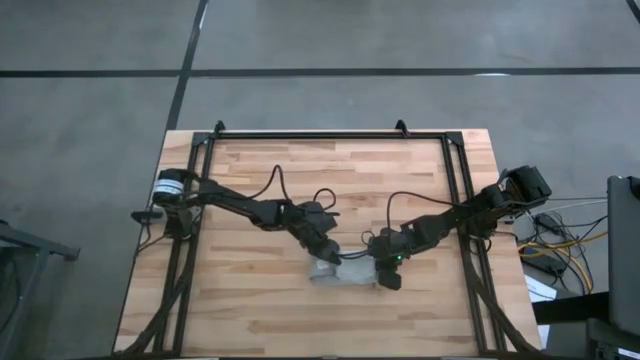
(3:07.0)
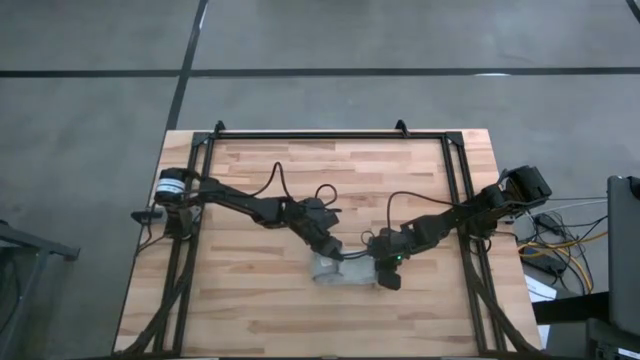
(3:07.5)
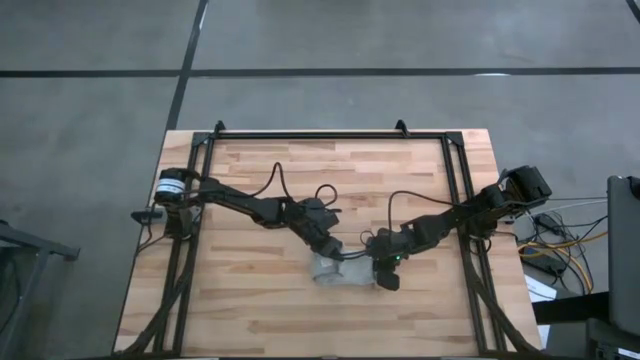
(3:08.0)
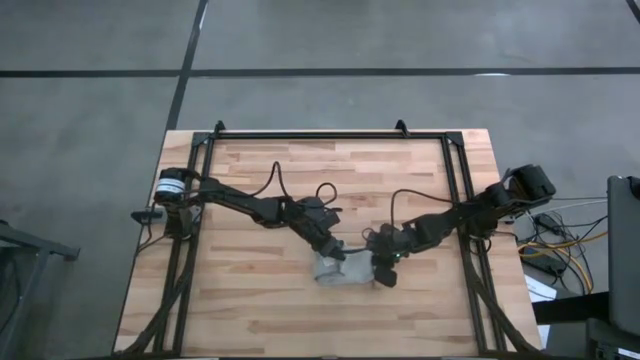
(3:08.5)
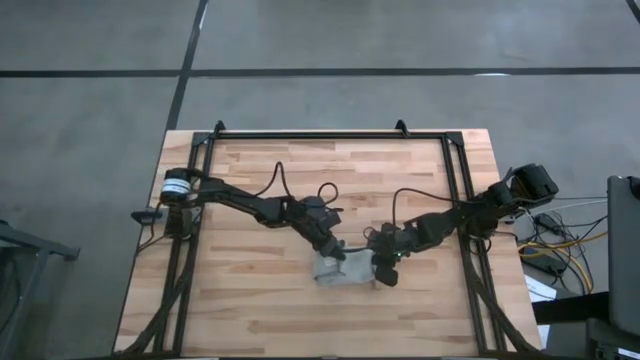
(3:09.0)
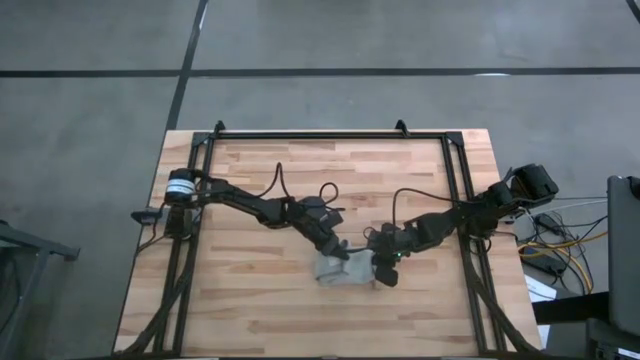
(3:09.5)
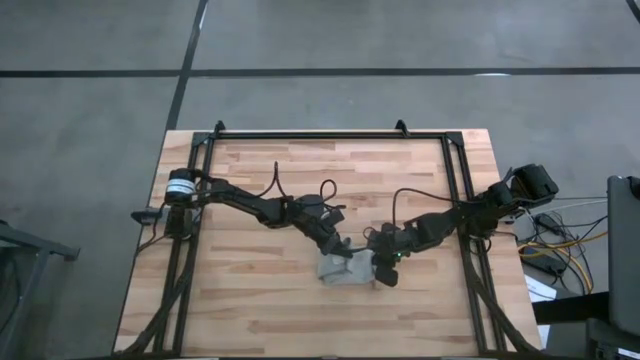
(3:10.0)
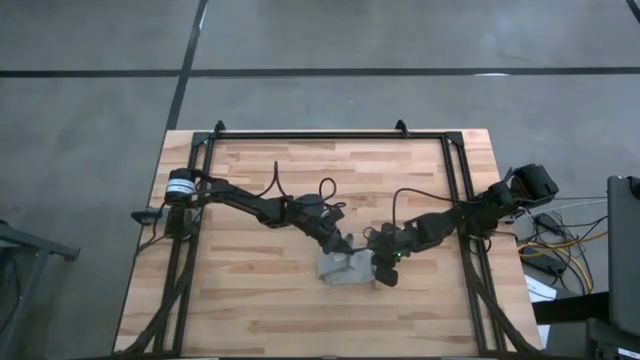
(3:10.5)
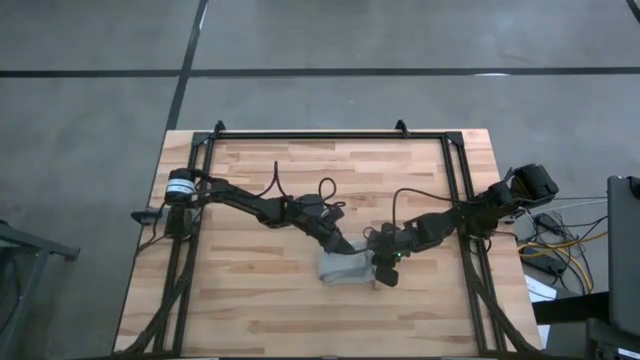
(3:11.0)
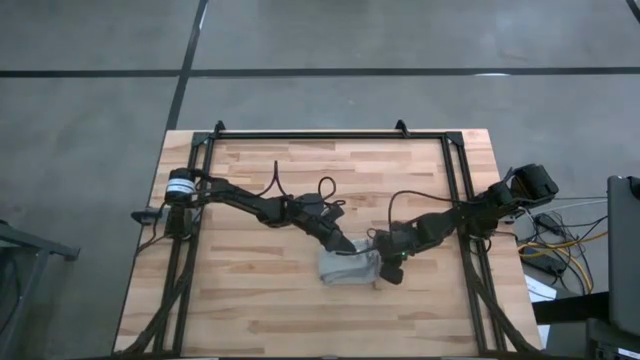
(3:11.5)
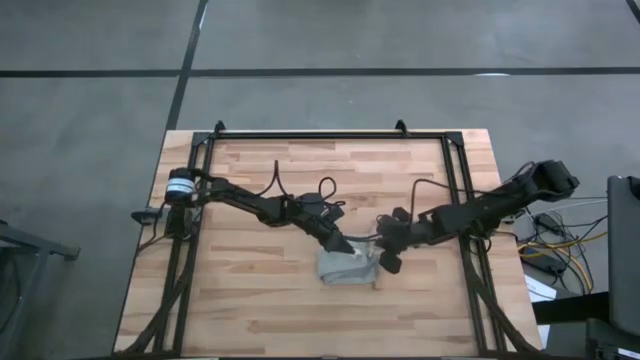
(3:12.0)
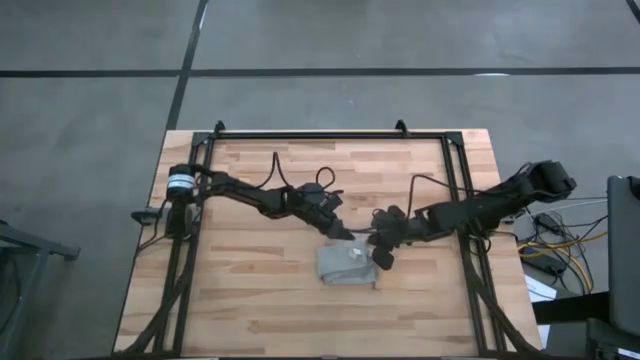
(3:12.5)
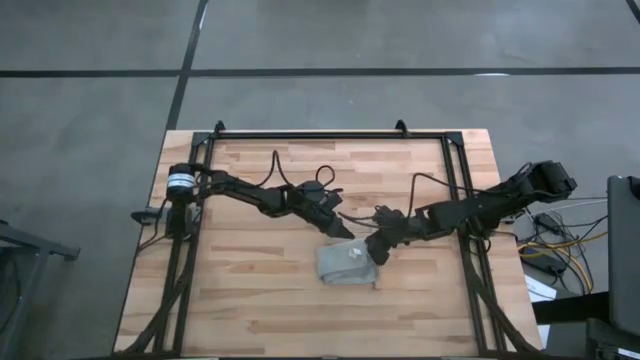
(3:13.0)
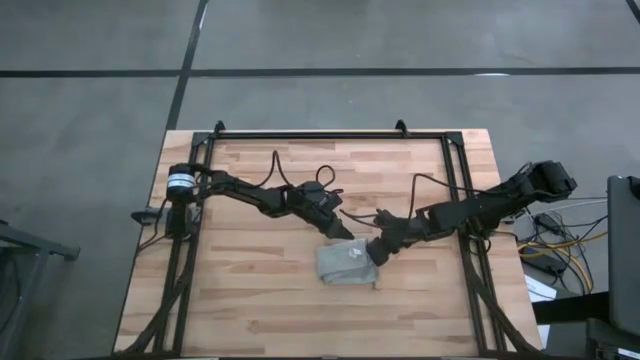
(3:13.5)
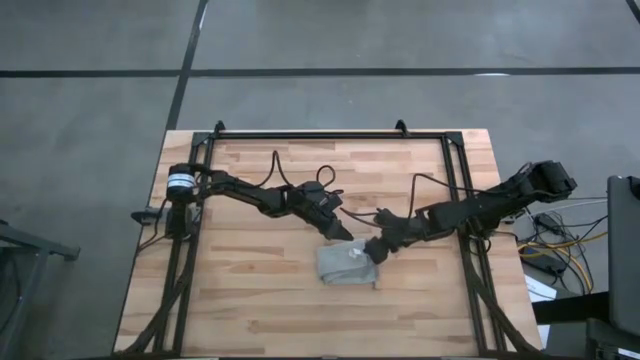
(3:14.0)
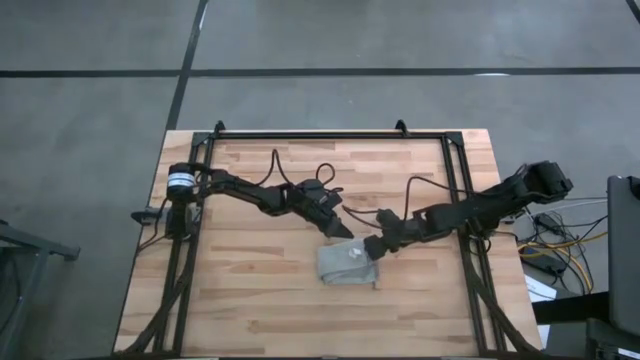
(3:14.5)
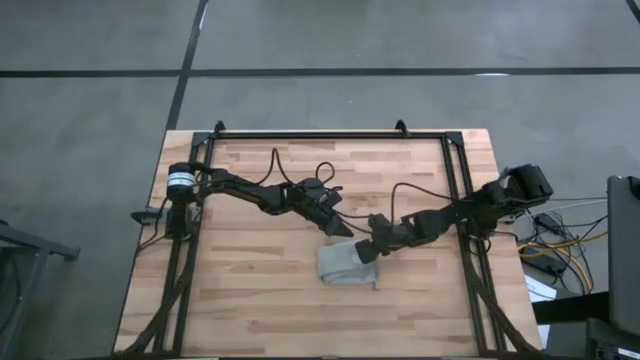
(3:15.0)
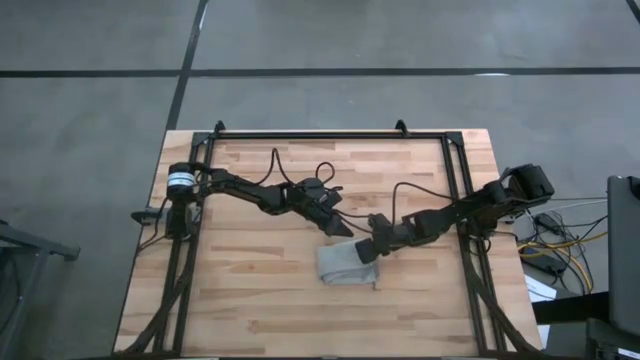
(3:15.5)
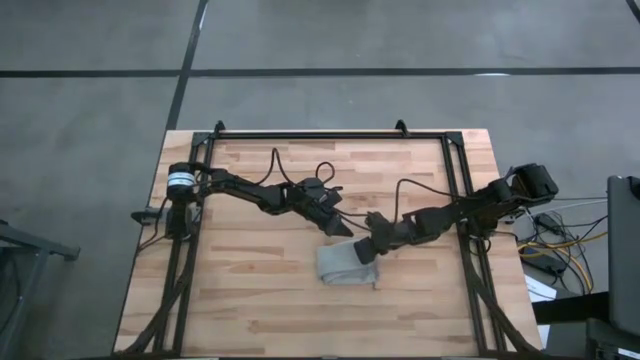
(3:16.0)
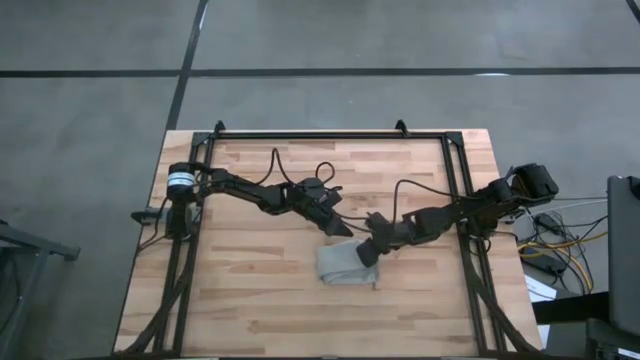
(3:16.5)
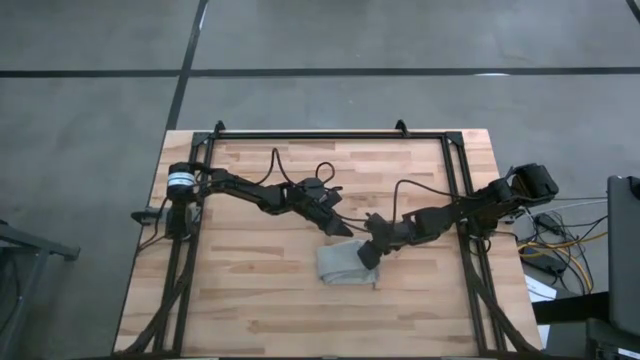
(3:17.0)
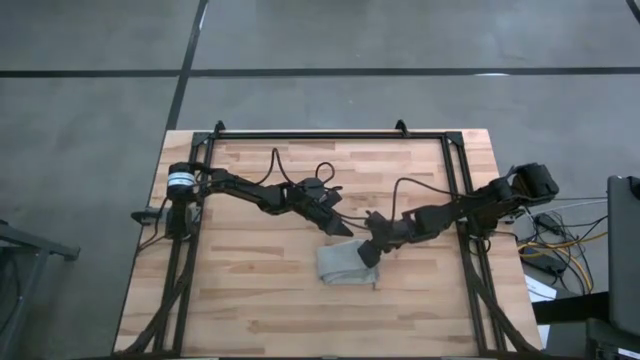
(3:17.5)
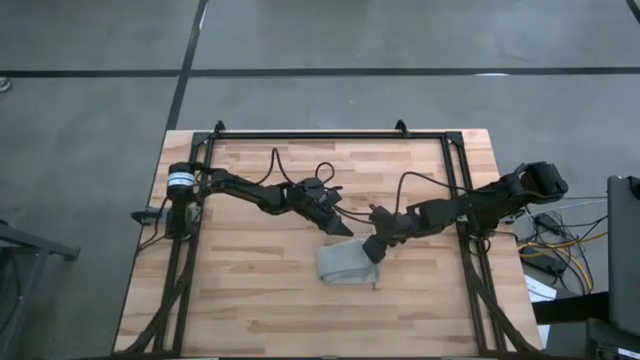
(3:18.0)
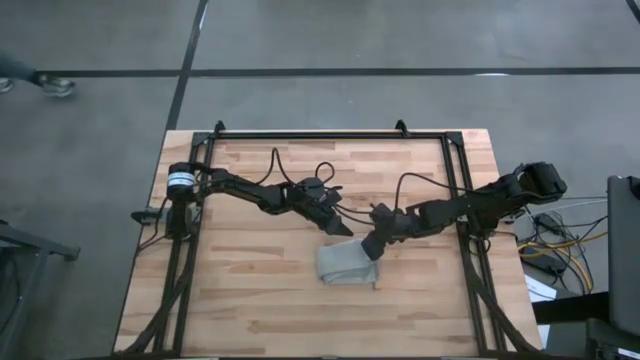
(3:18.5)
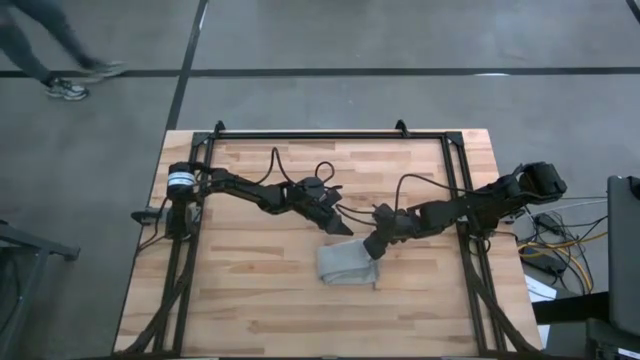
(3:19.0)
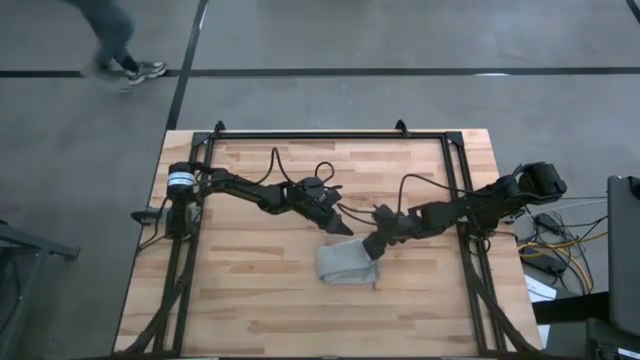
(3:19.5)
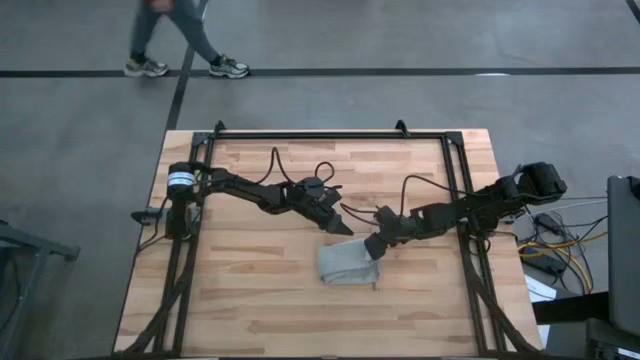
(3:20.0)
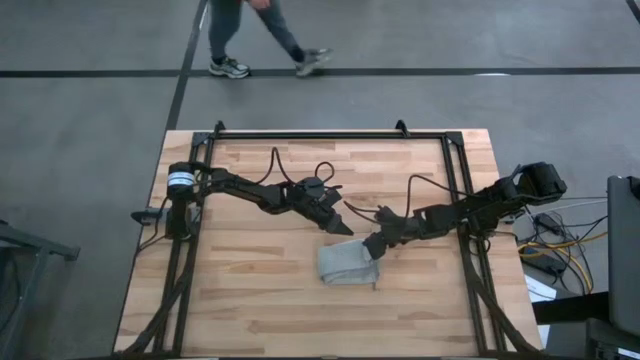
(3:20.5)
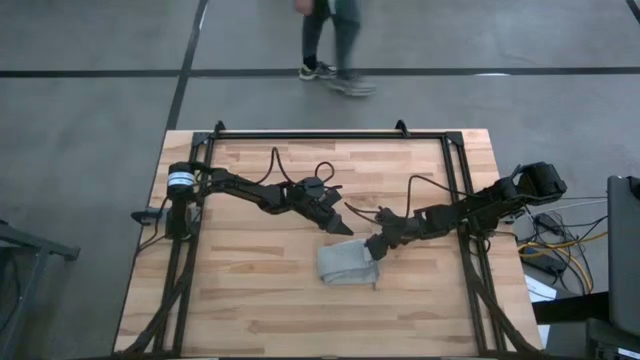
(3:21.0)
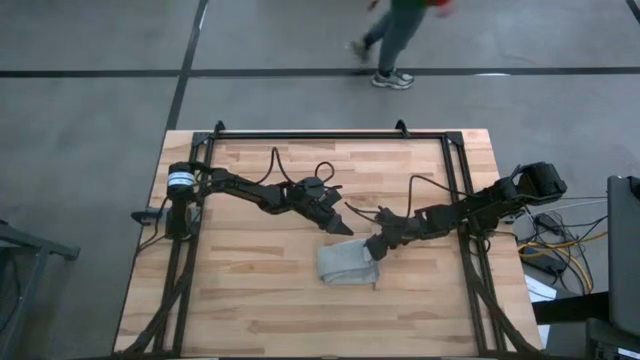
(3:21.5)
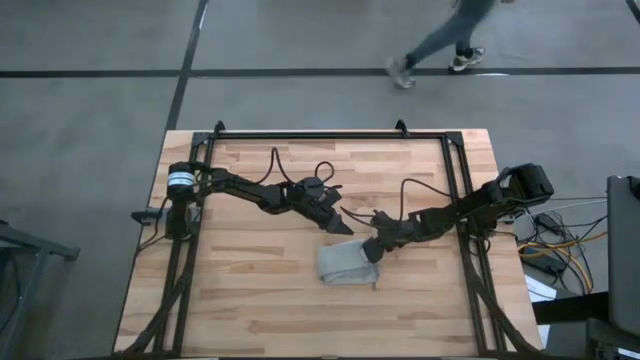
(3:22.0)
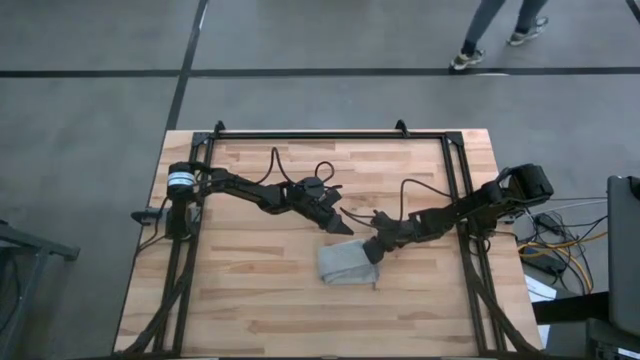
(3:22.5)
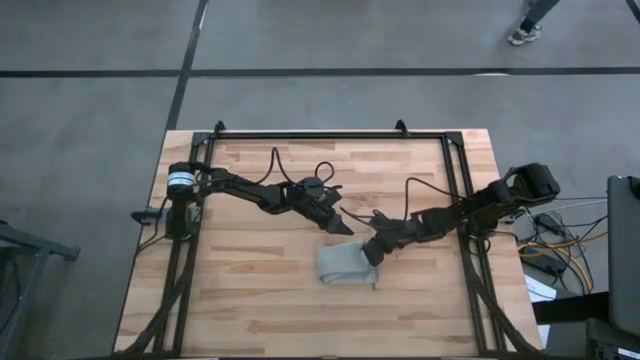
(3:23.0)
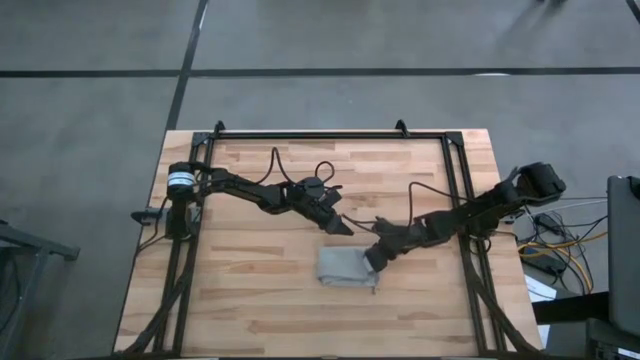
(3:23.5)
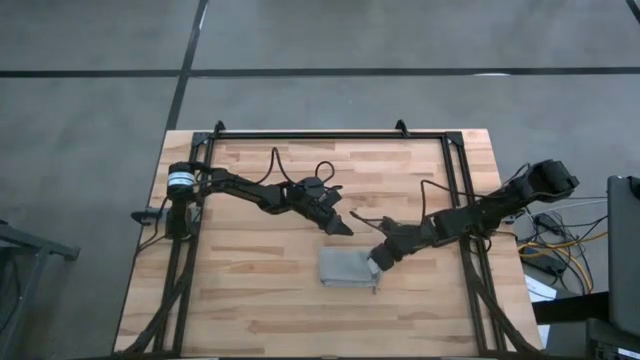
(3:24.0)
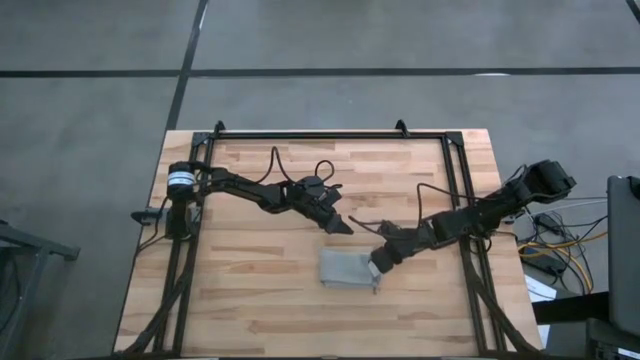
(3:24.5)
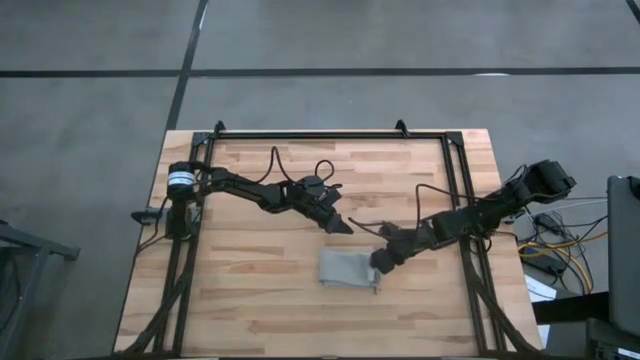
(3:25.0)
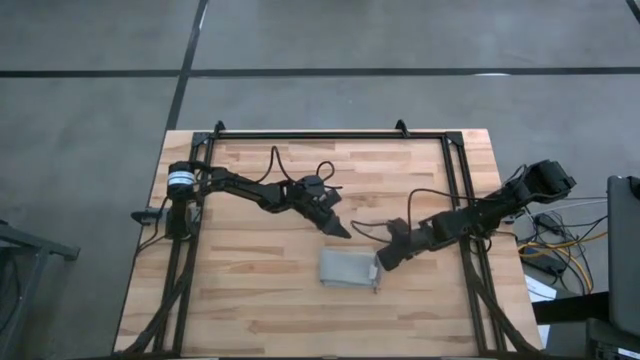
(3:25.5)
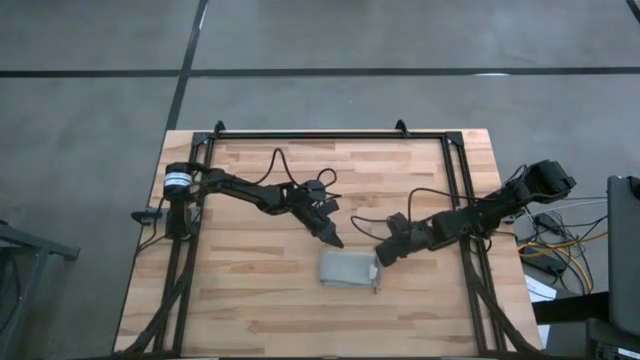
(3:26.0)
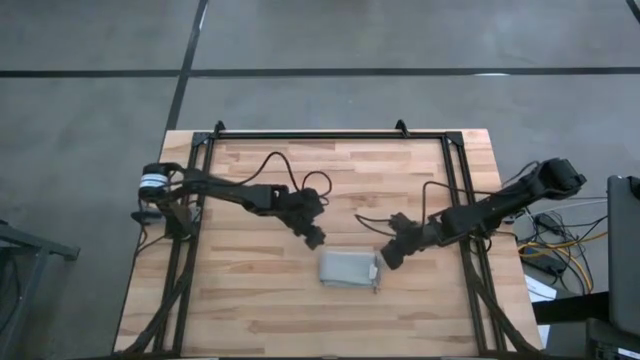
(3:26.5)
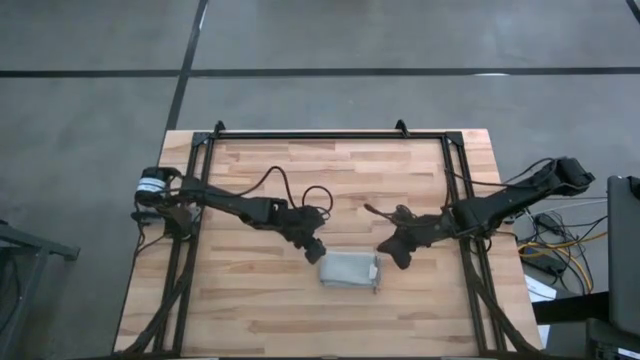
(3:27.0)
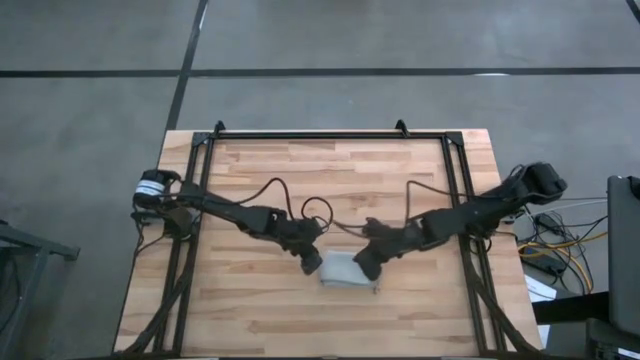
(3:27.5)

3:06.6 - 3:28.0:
Task: Fold microfiber towels
Fold the microfiber cloth on the table
